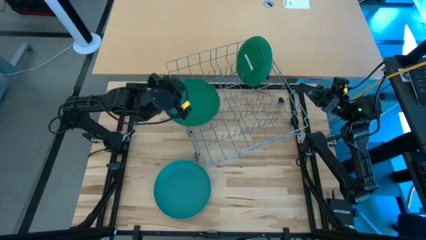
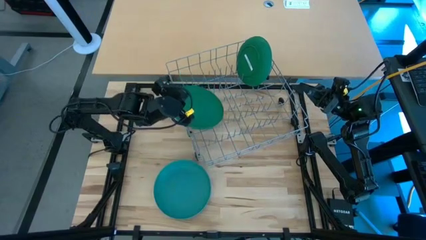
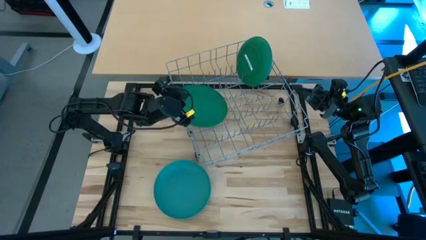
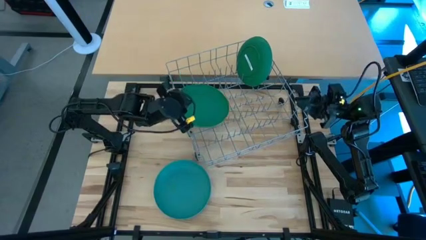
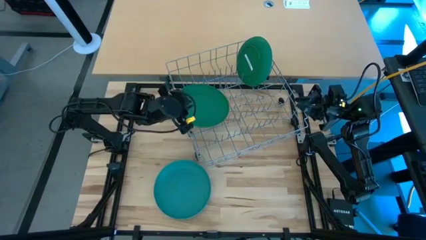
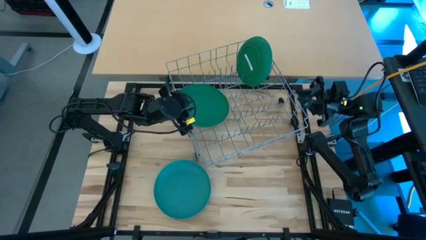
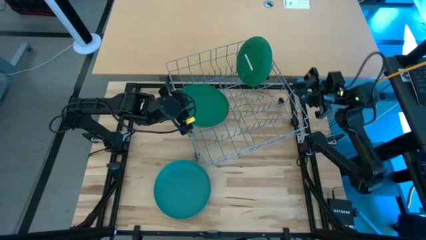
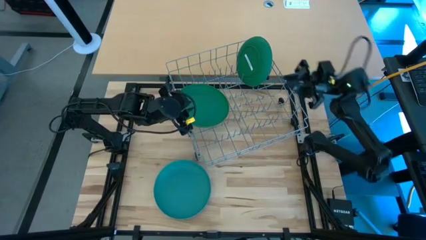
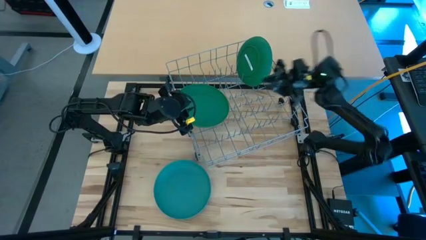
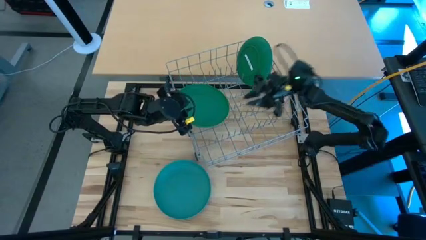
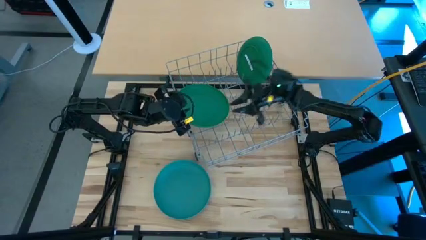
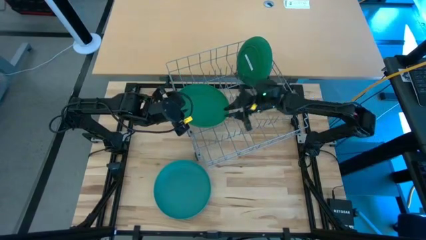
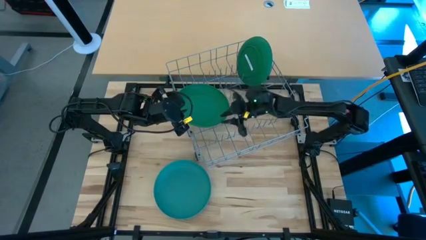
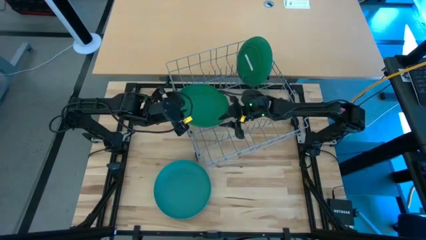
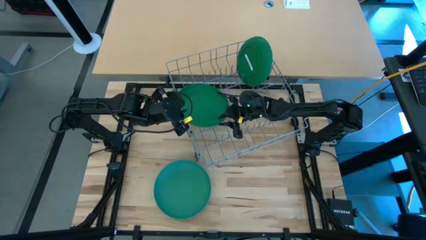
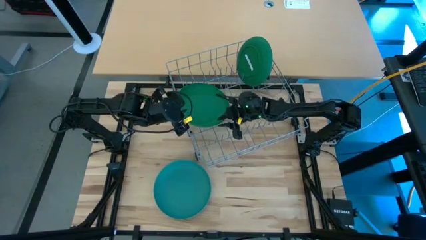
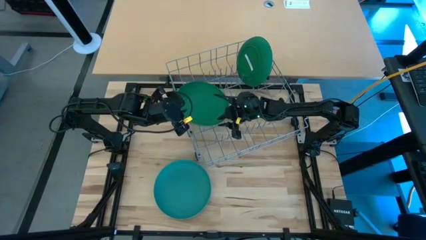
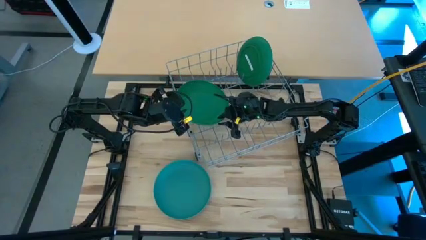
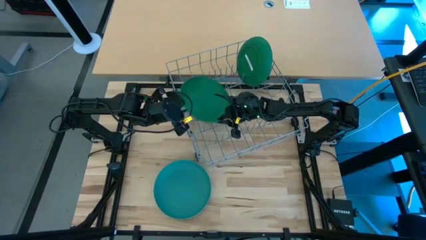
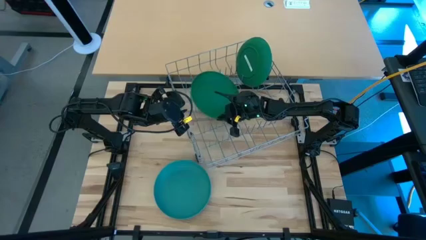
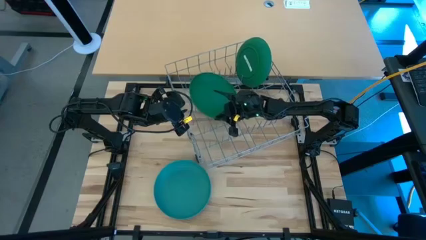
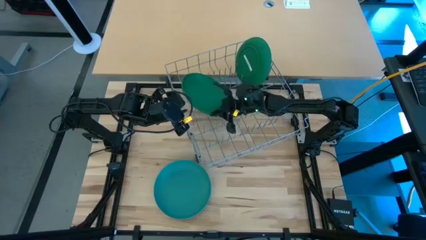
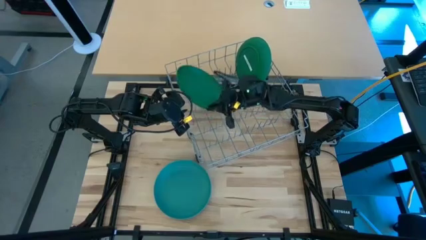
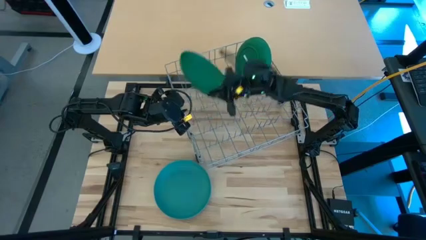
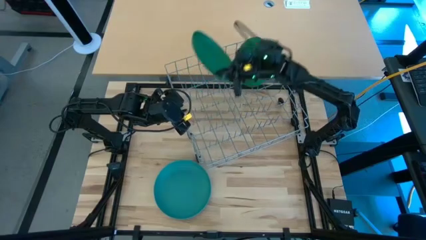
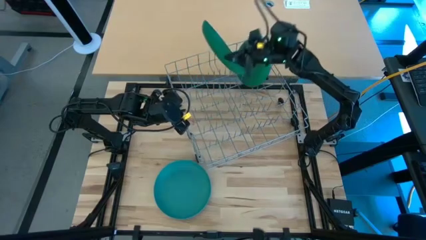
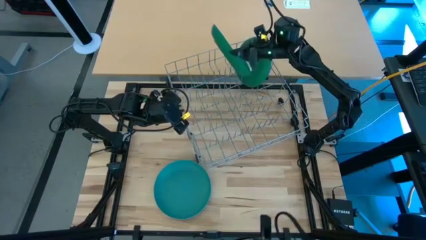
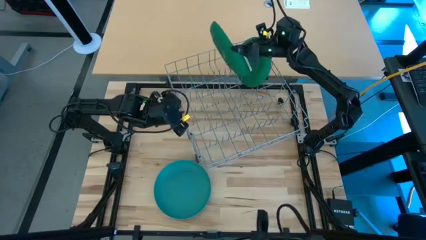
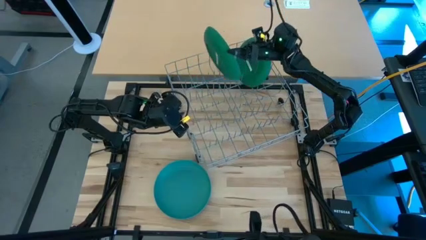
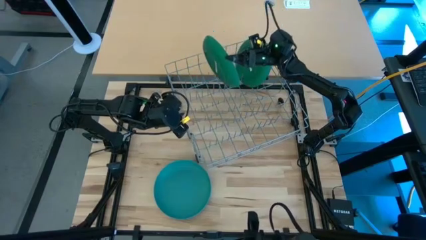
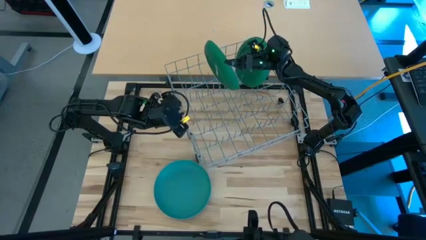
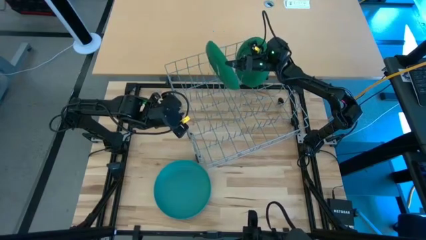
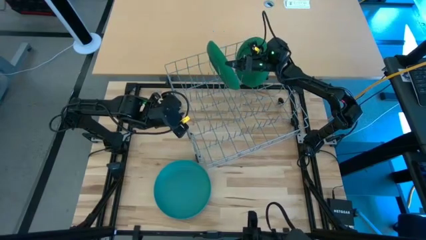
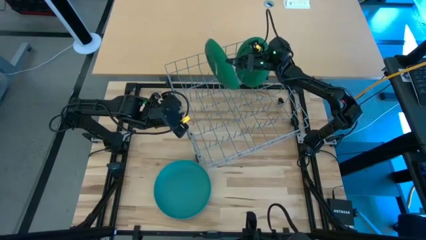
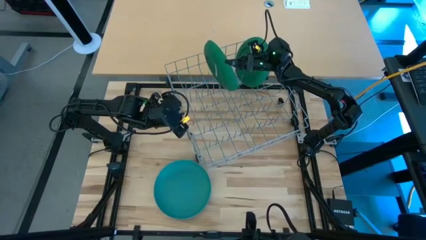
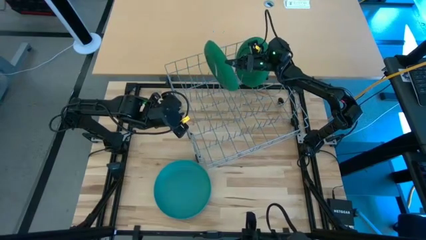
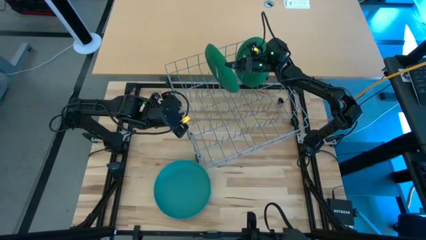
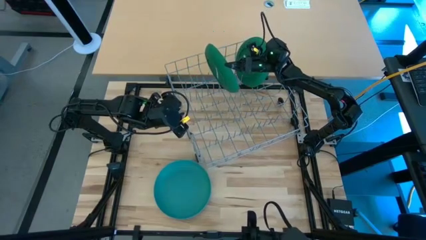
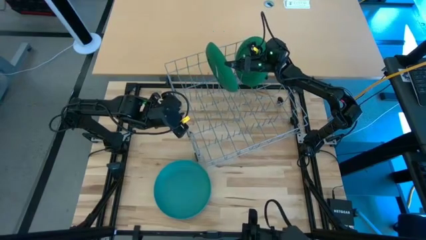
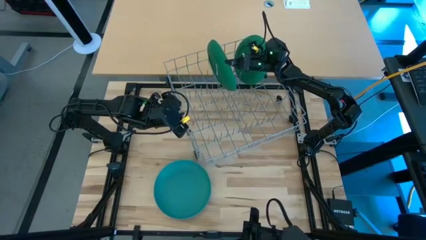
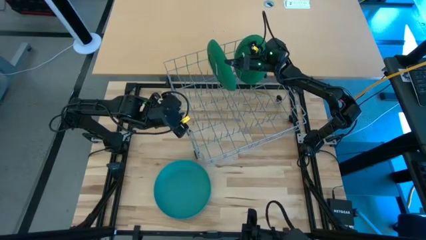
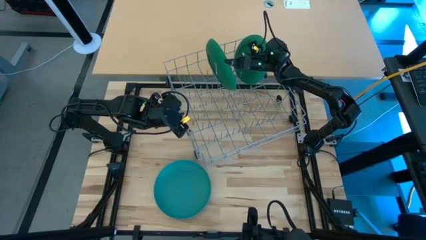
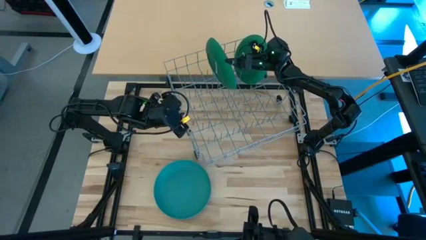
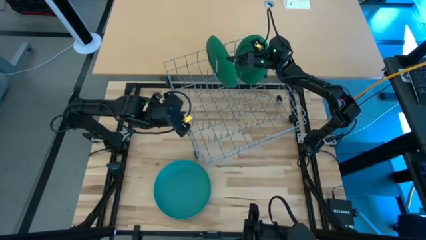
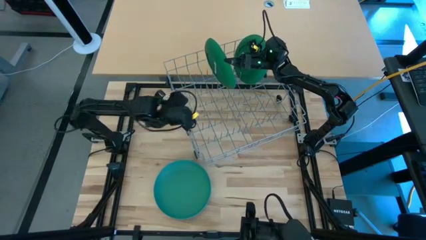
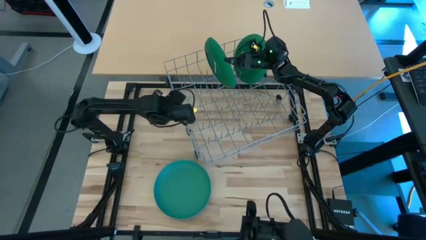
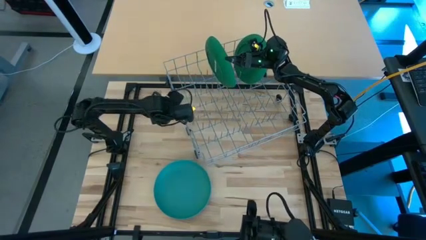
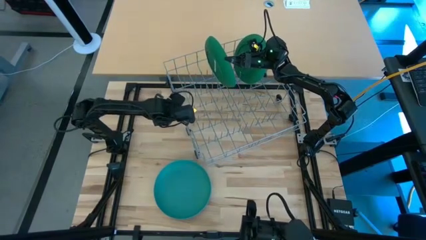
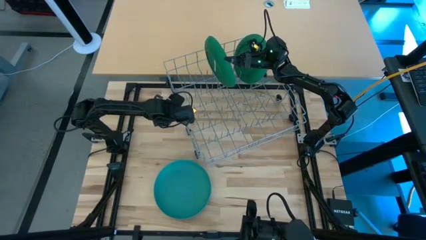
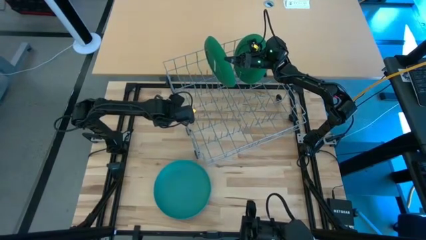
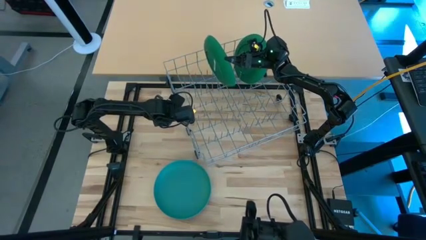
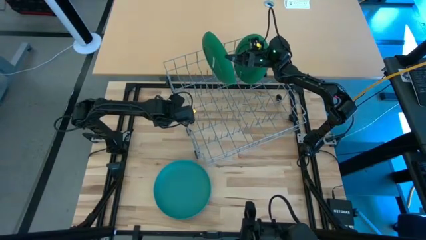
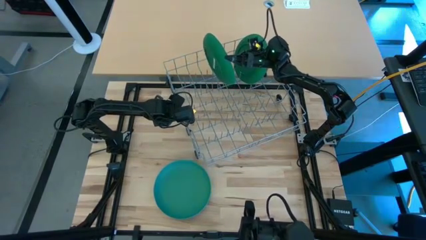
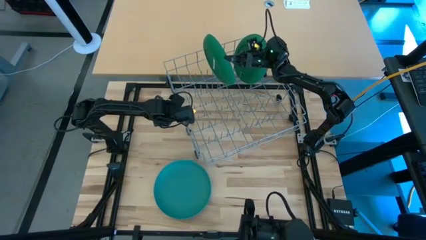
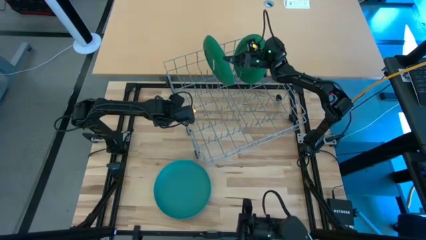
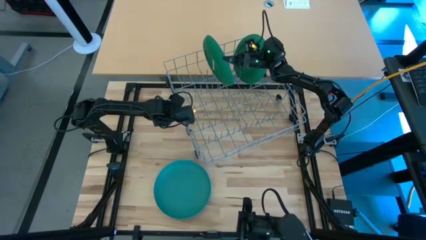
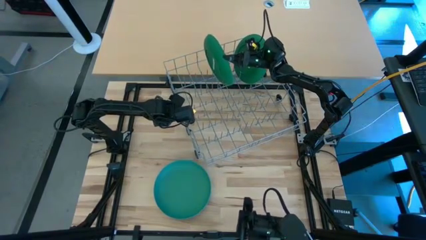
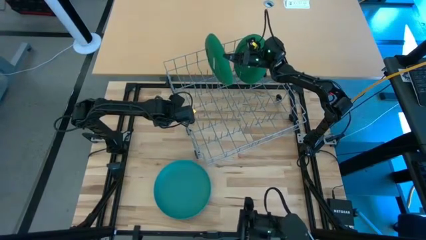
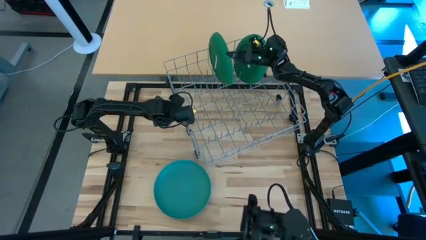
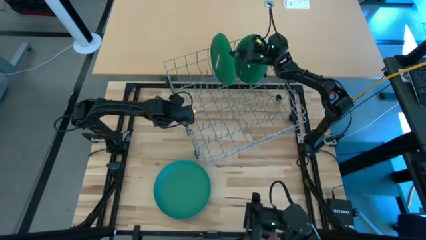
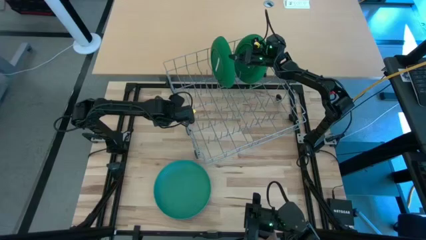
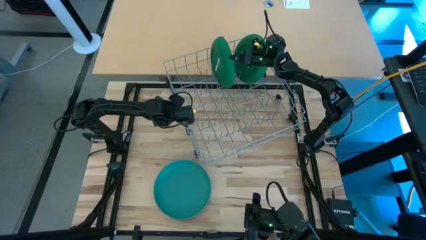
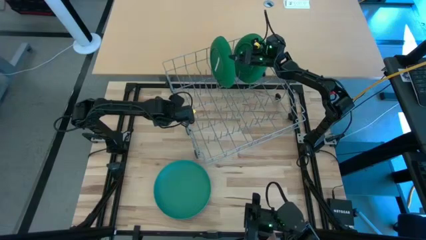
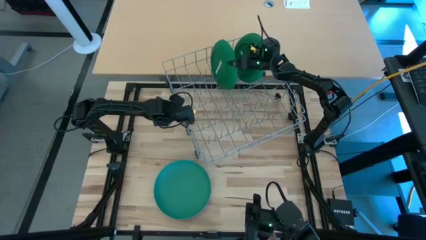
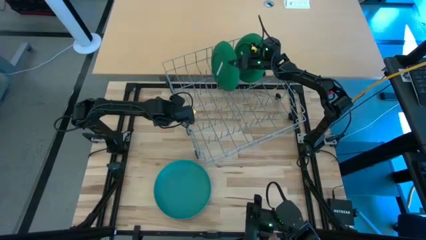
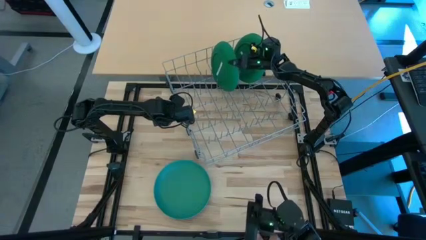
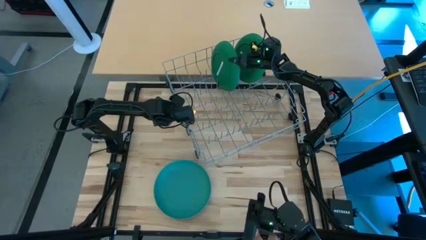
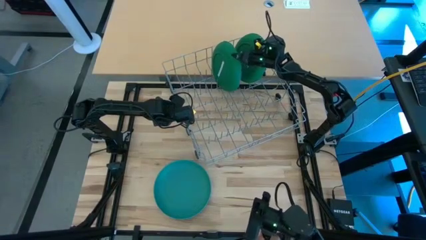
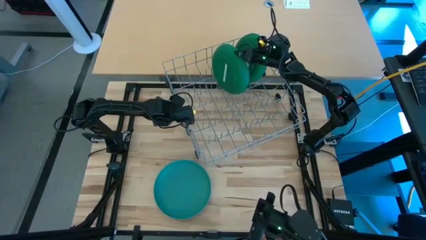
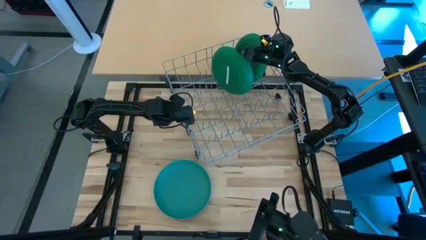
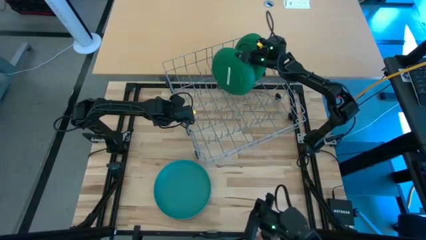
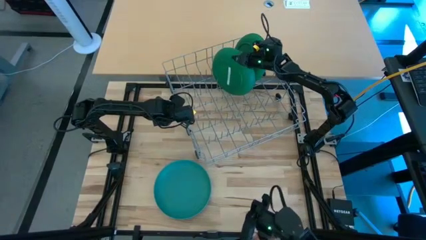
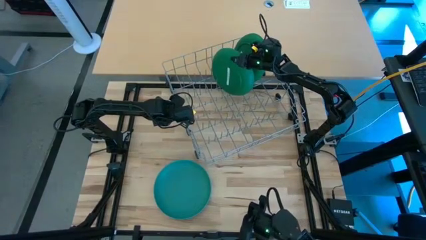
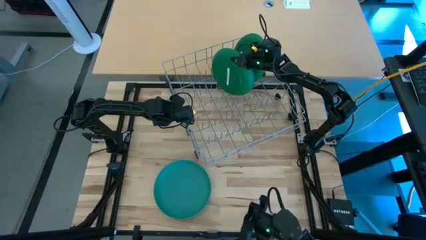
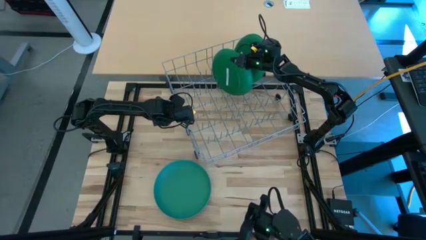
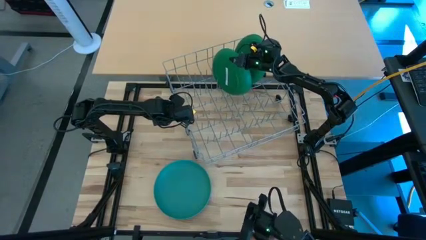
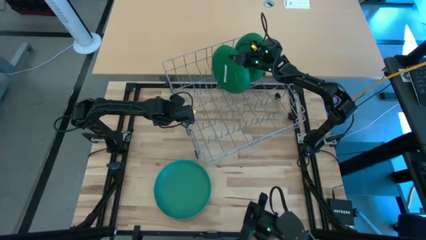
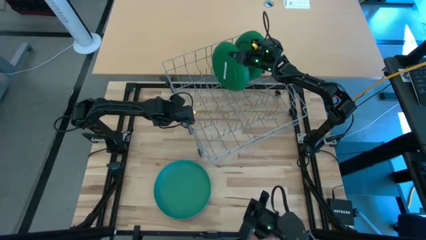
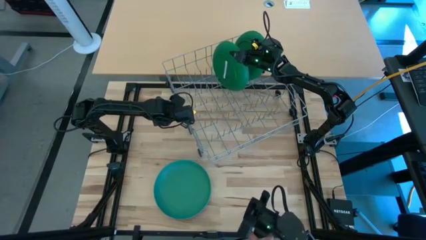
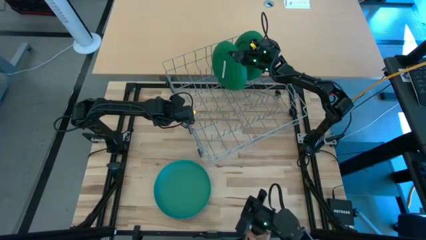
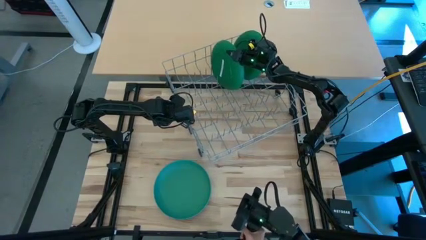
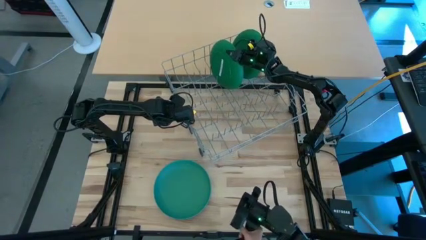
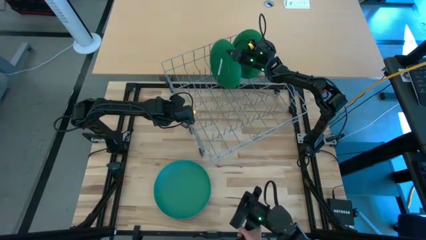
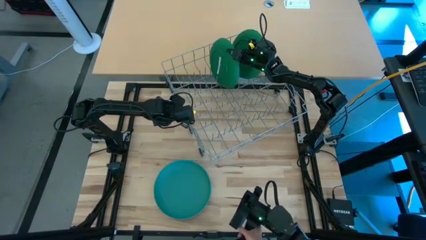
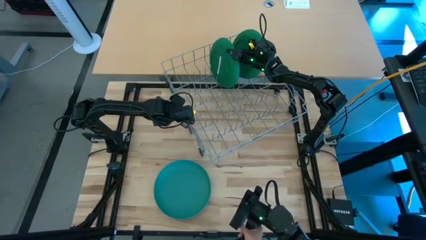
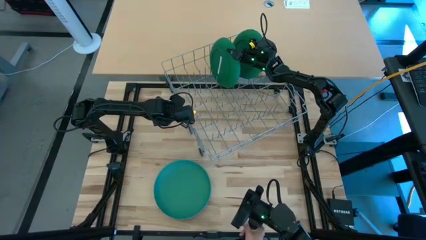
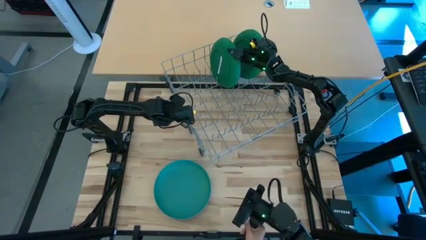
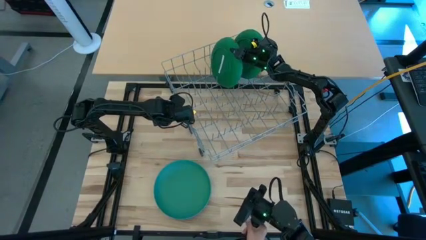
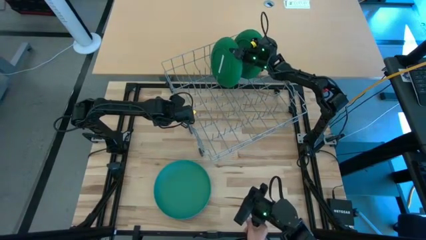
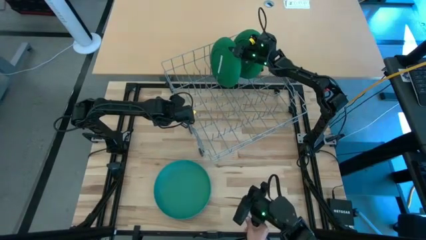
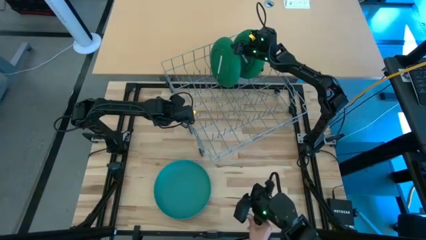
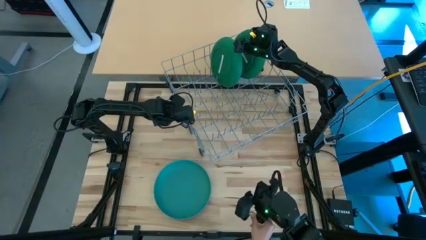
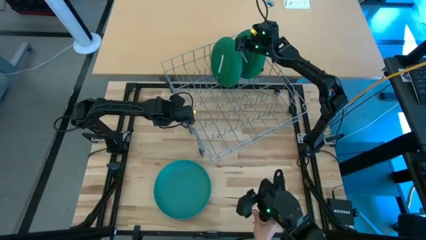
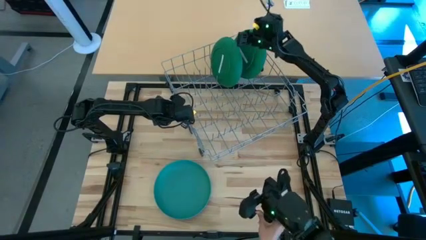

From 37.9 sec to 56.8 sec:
Task: Sort dishes
Put the dark green plate in the dish rack
